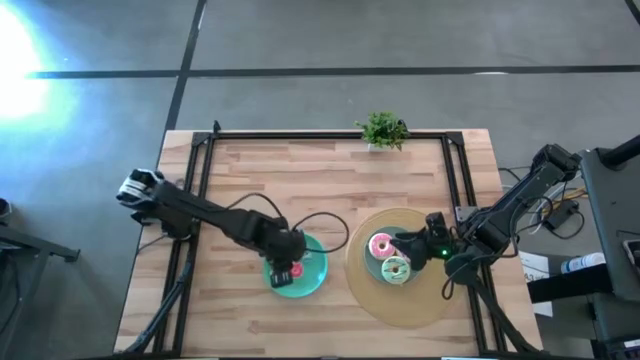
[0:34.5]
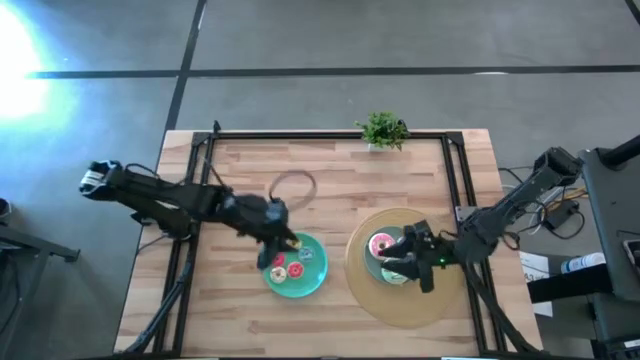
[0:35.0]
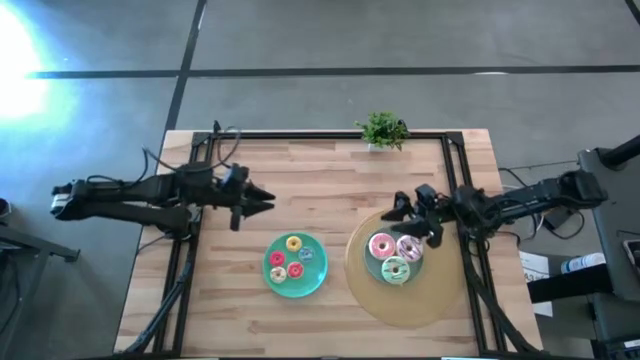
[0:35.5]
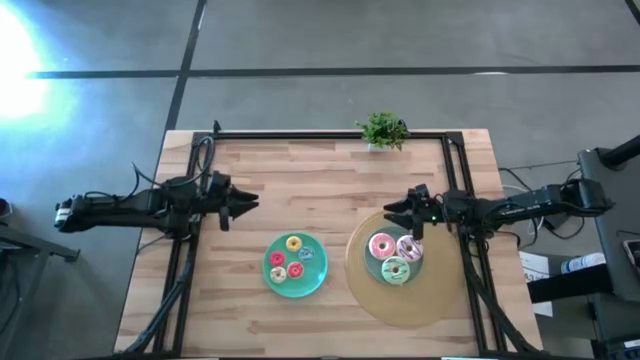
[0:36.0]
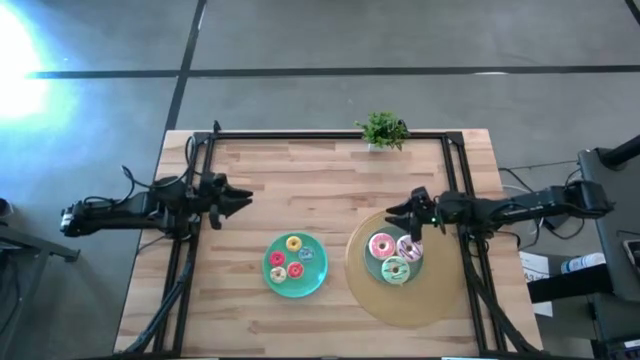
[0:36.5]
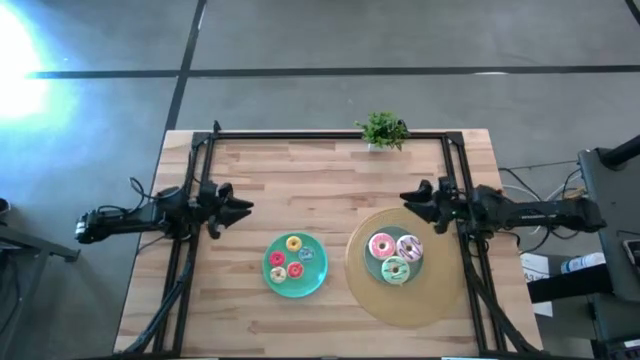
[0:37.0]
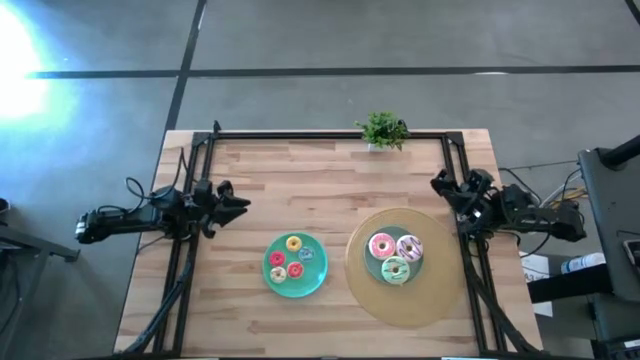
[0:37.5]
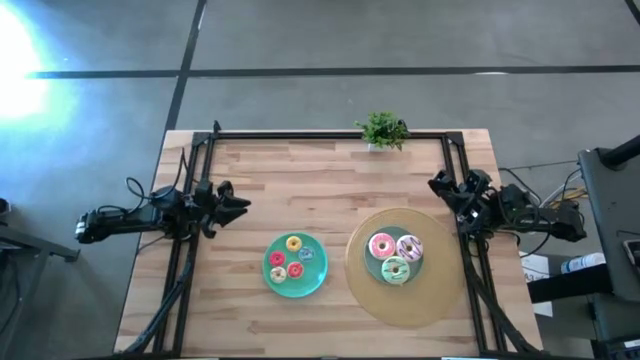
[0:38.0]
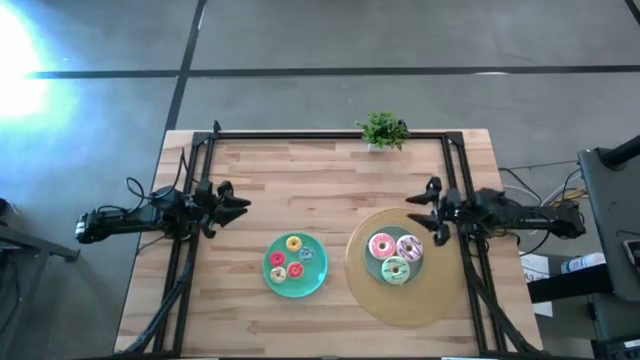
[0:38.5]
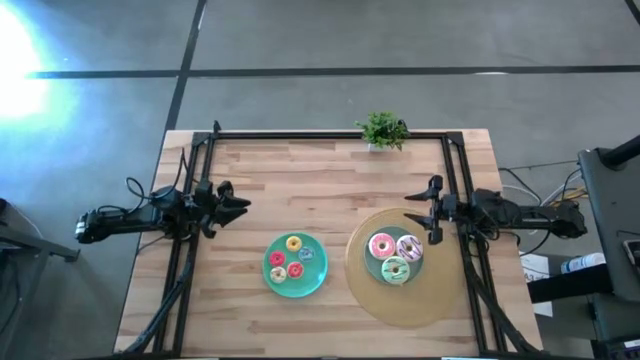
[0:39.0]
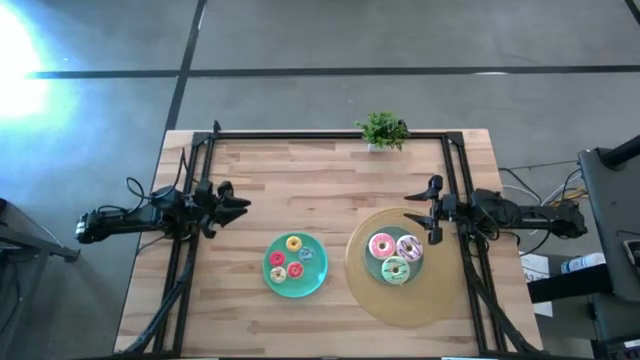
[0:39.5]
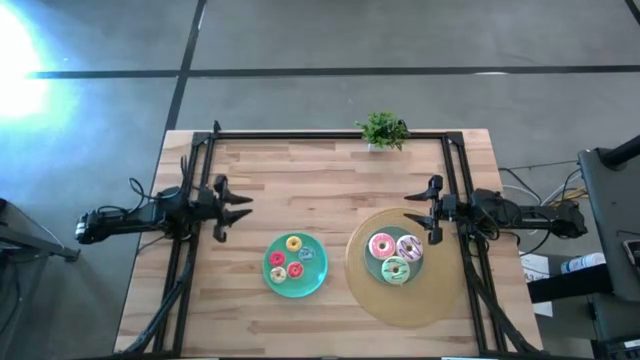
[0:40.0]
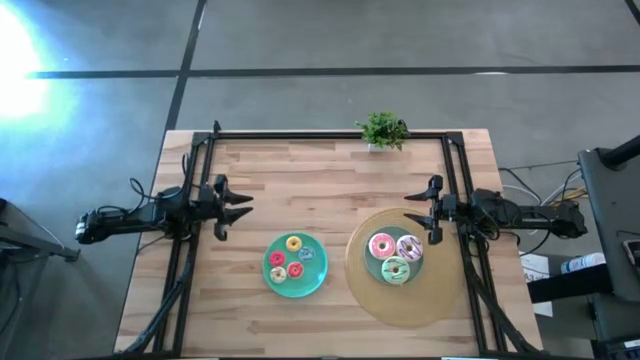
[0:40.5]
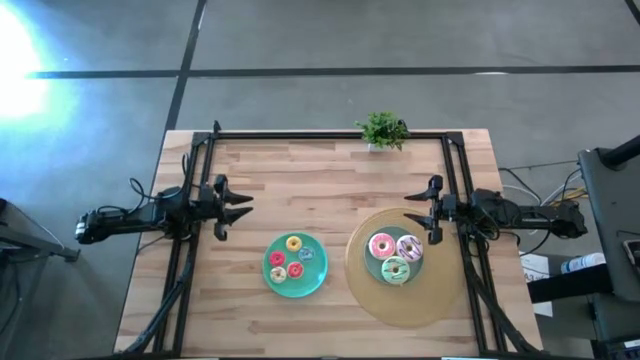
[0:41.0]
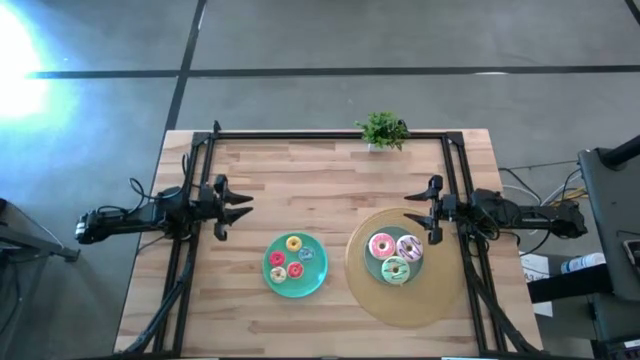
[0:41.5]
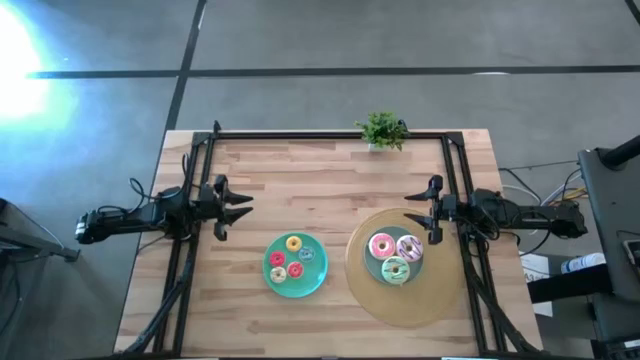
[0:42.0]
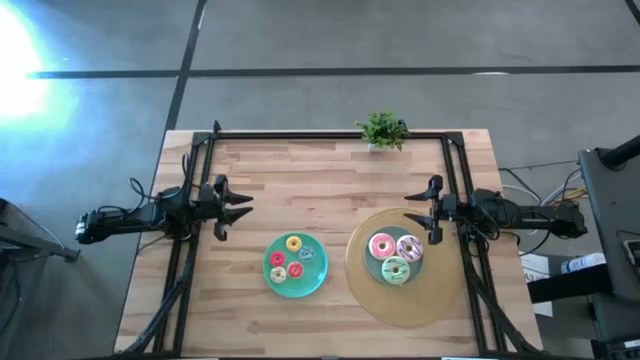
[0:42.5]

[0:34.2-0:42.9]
Task: Pick & Place donuts
Return to Home Position

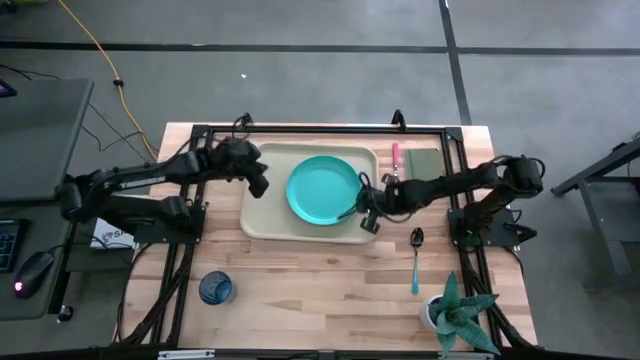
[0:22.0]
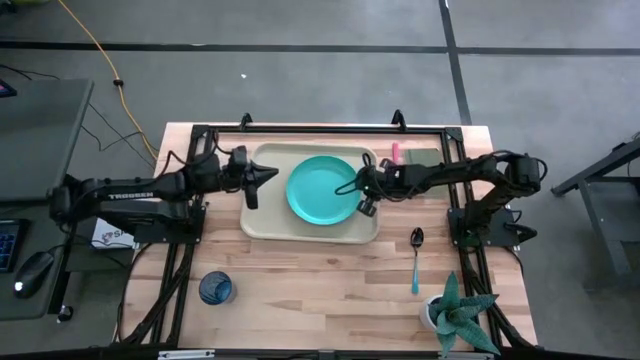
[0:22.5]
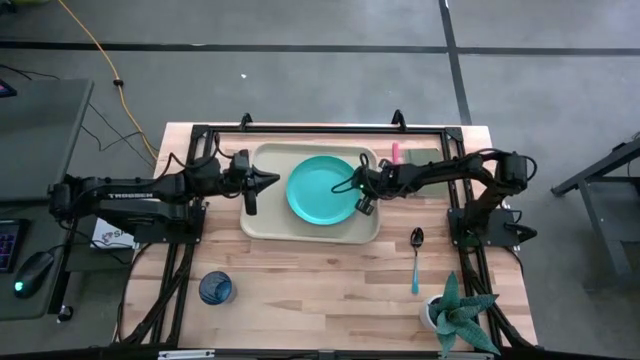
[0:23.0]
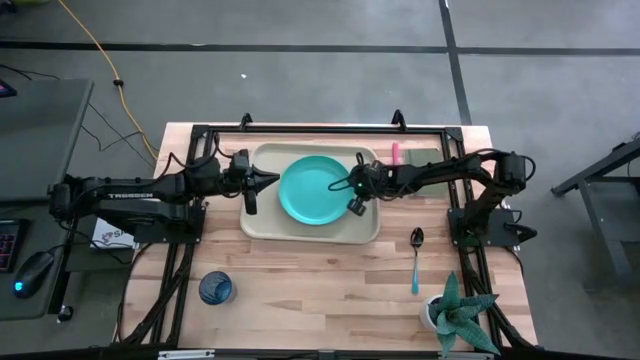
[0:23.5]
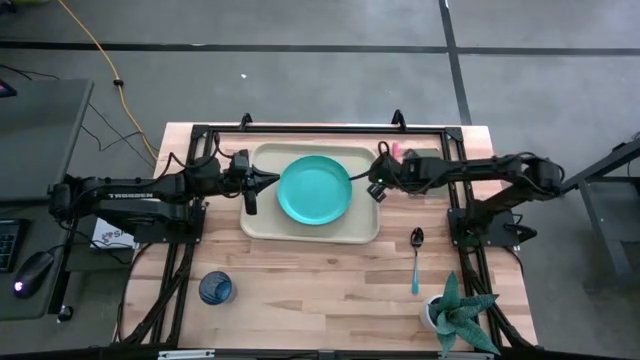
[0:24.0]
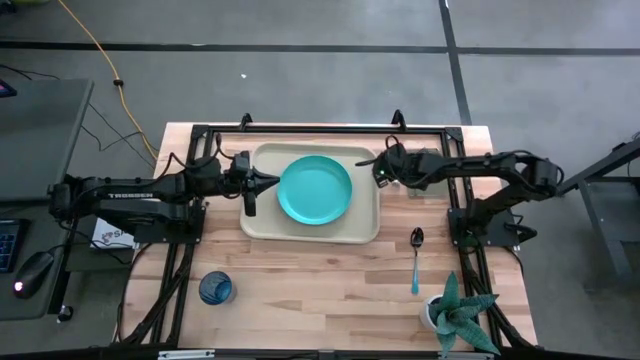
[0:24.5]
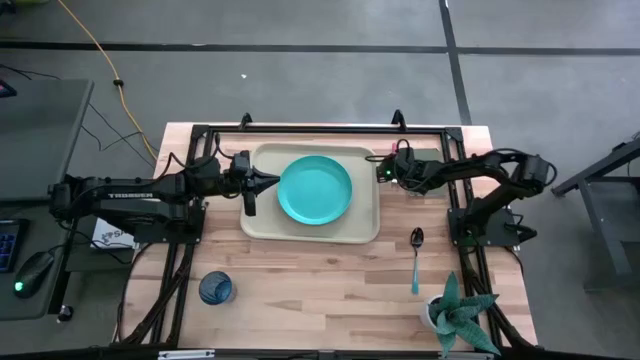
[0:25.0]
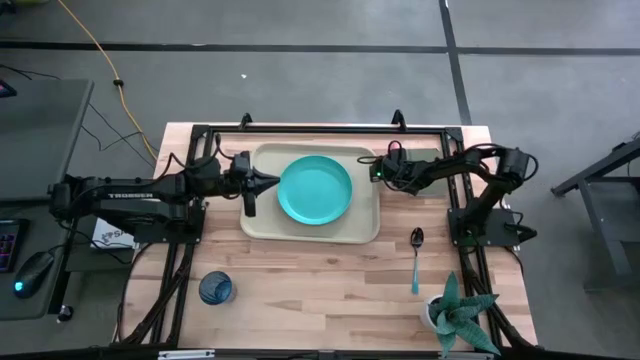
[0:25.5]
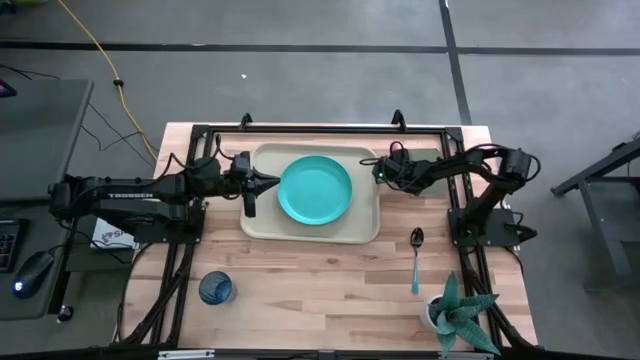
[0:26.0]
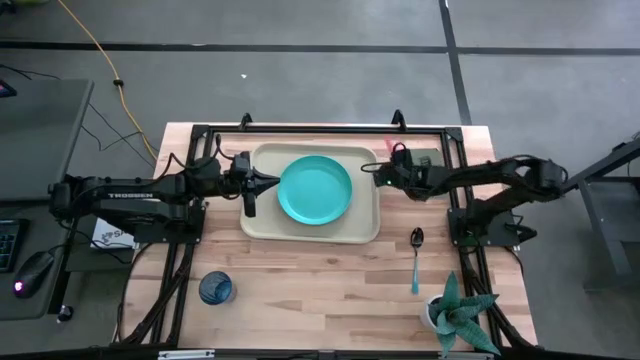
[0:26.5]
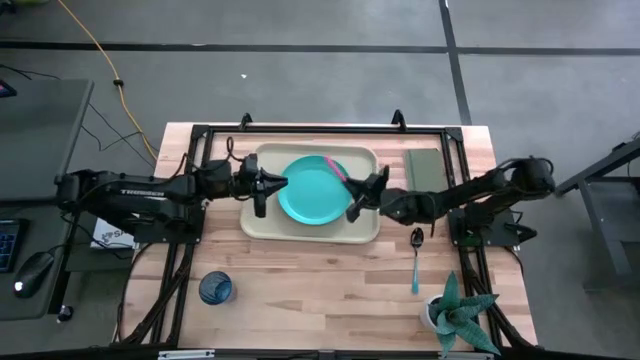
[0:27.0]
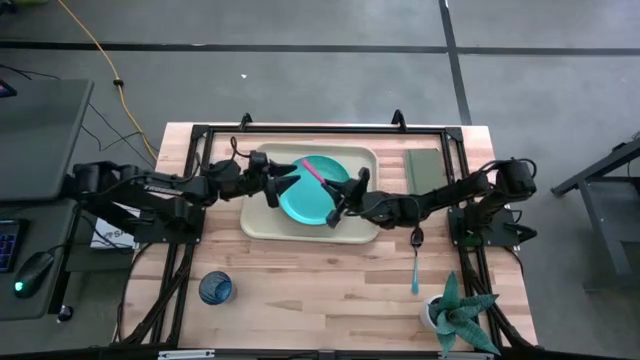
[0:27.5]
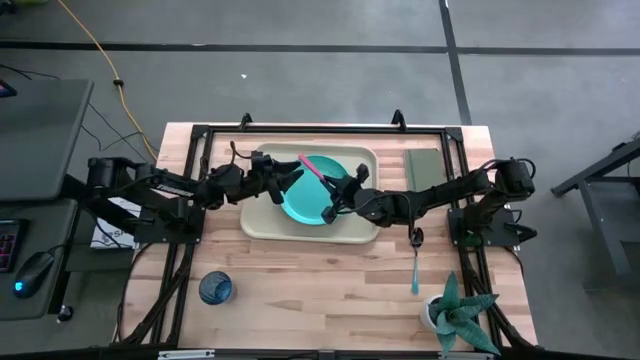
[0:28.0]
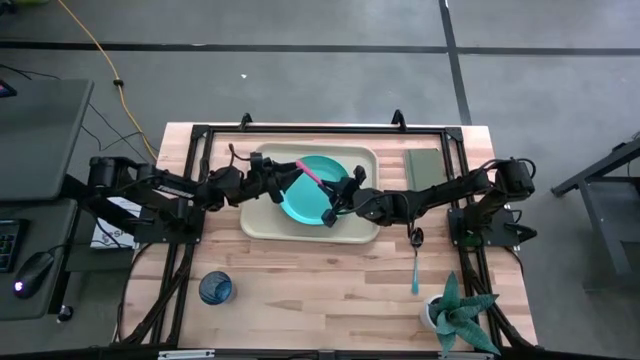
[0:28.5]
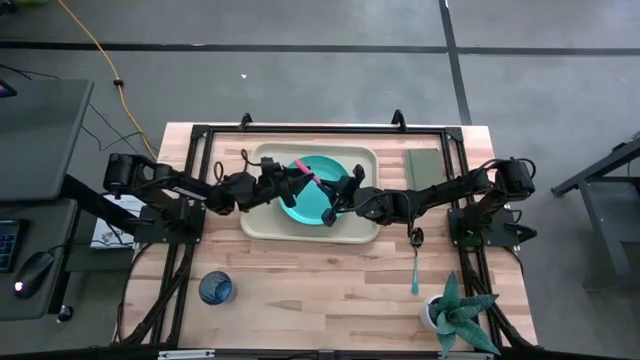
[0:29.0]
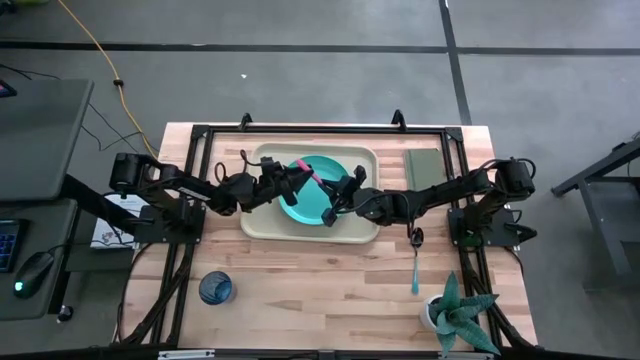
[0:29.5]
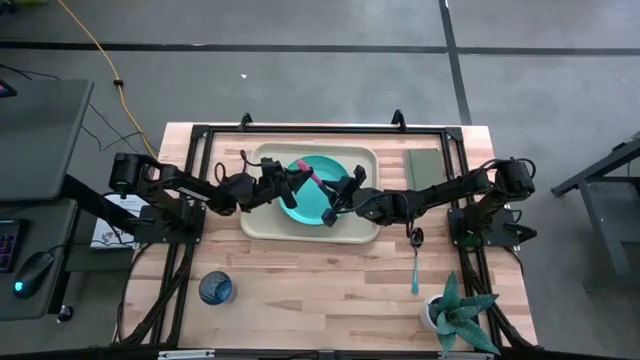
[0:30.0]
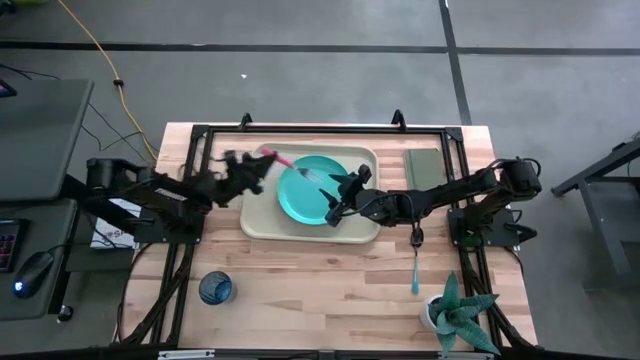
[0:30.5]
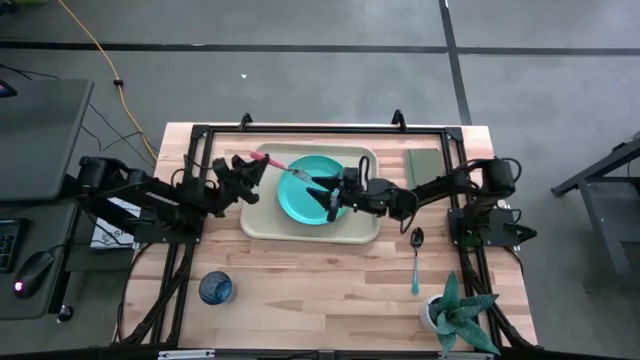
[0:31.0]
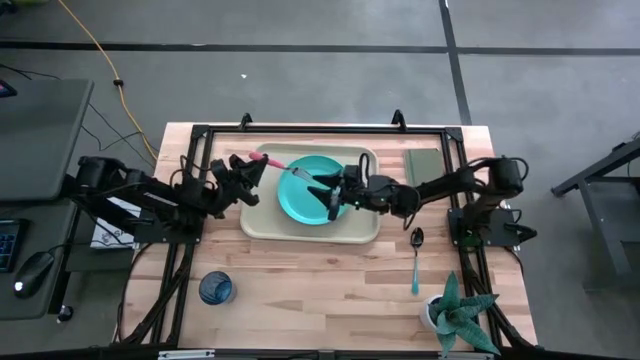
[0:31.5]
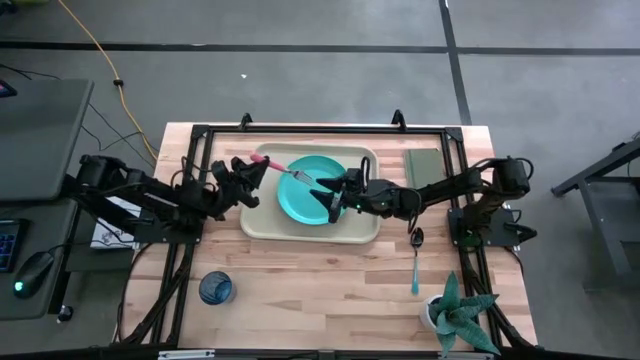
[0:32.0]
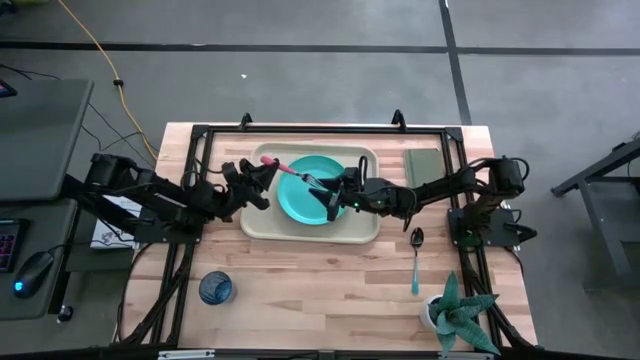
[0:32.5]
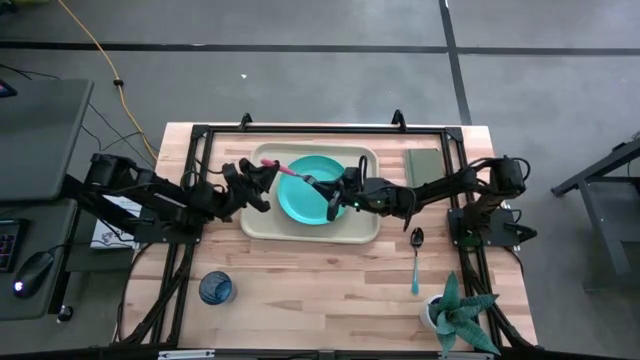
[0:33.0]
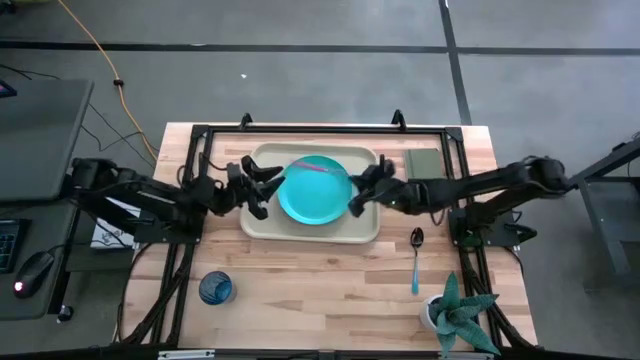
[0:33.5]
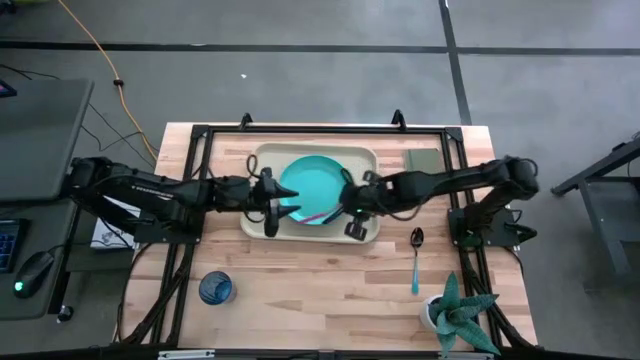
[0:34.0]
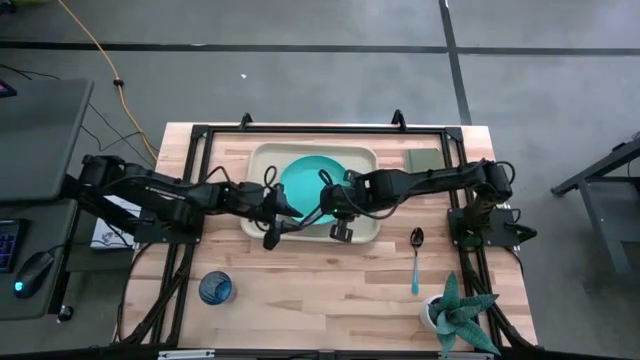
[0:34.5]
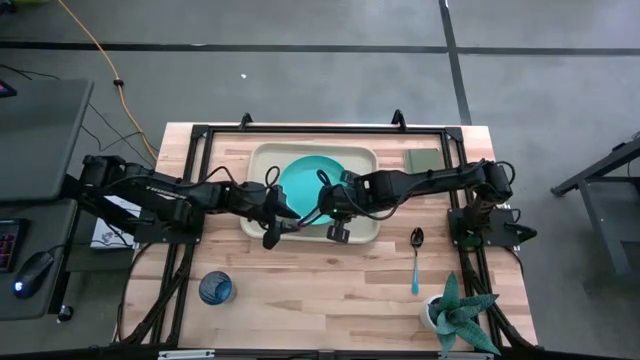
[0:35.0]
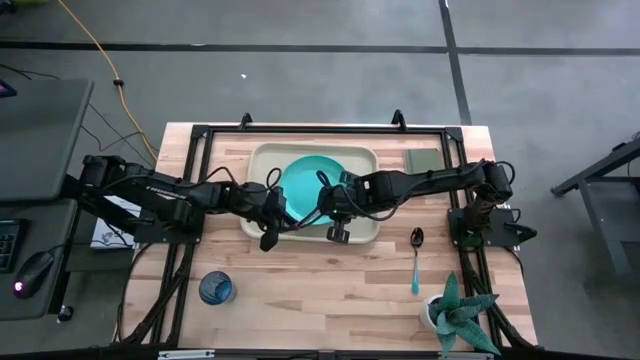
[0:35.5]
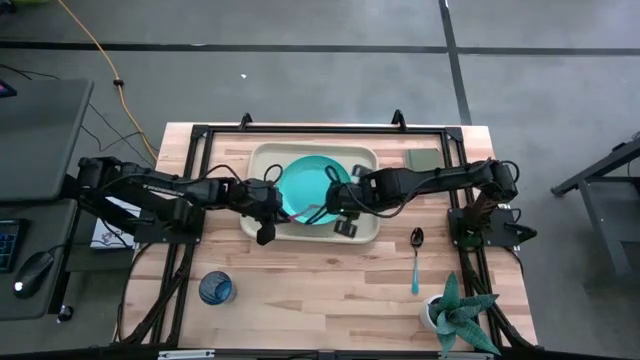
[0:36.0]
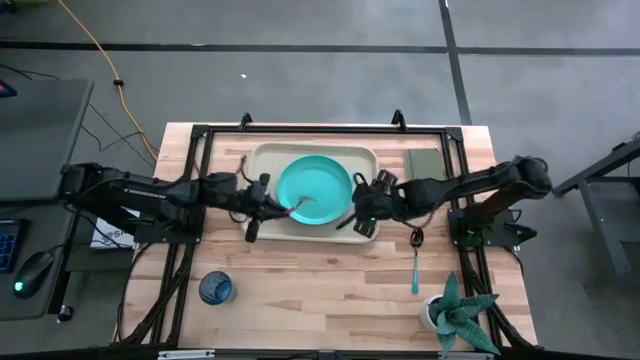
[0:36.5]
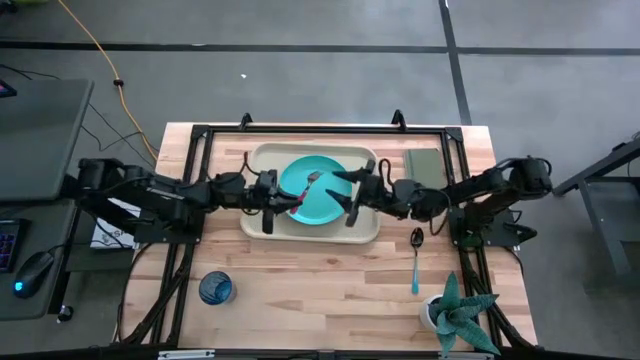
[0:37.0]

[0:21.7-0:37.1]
Task: Pick and place plate/cup/fork/spoon on tray
Put the pink fork to the left of the blue plate on the light brown tray
